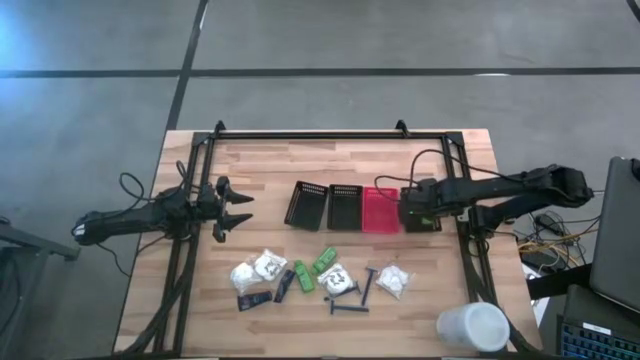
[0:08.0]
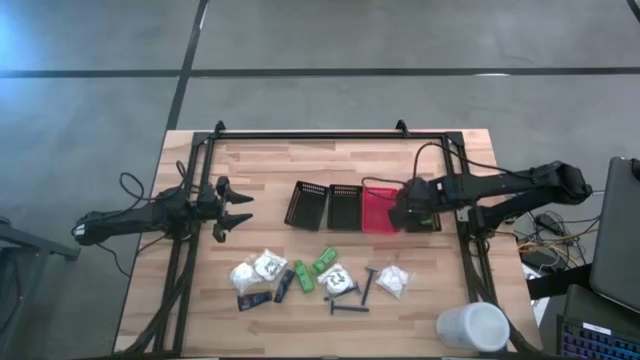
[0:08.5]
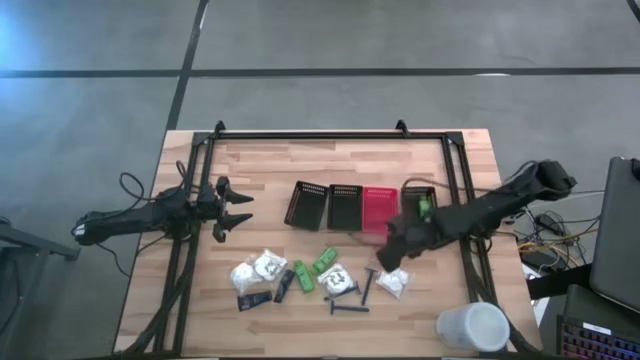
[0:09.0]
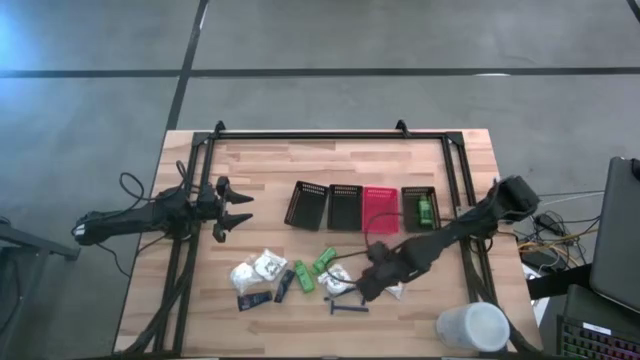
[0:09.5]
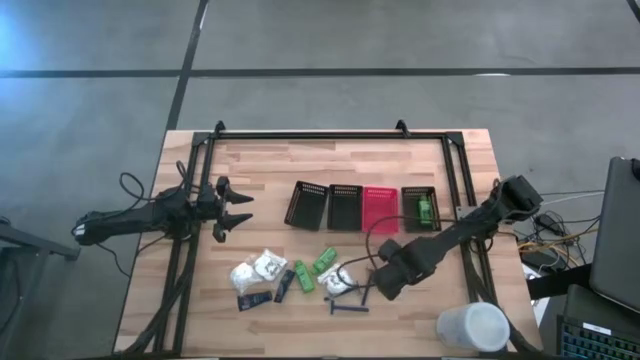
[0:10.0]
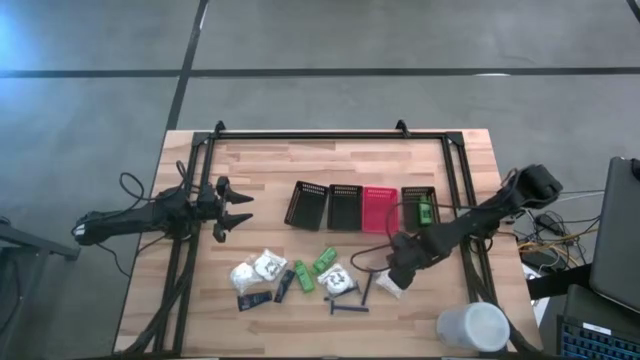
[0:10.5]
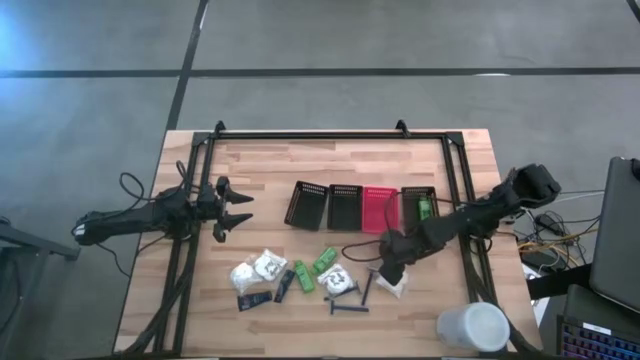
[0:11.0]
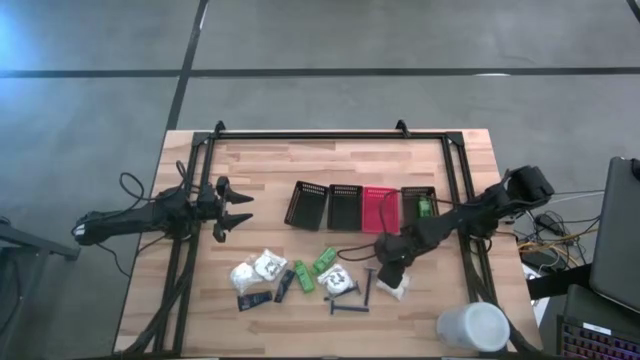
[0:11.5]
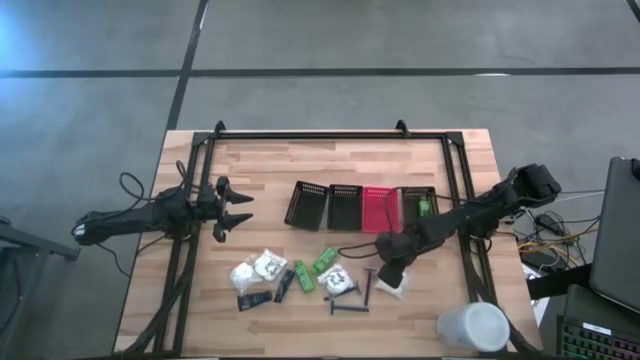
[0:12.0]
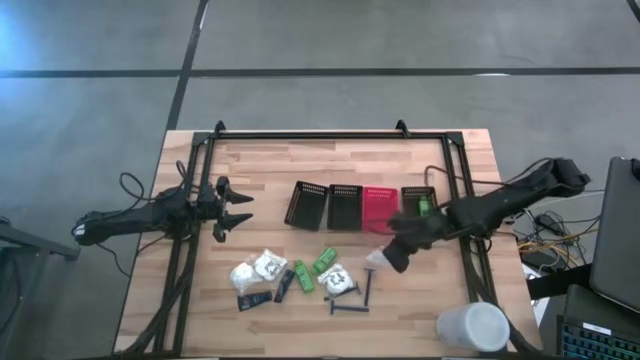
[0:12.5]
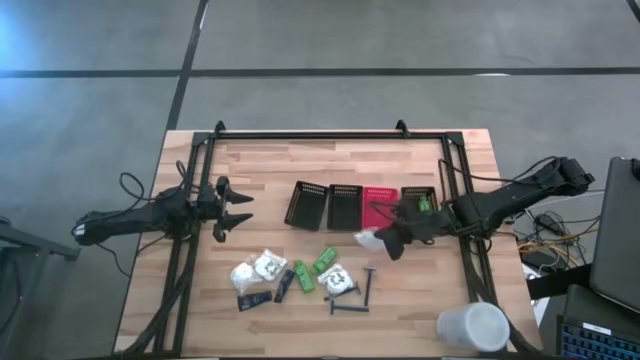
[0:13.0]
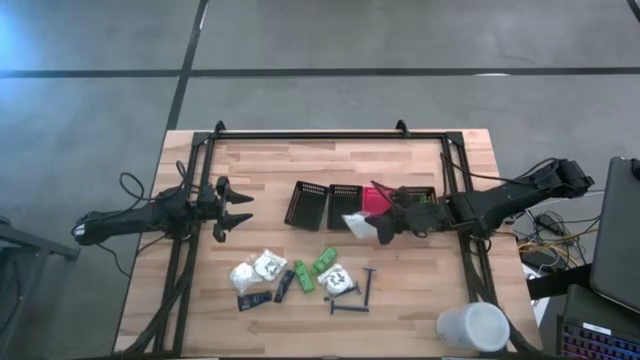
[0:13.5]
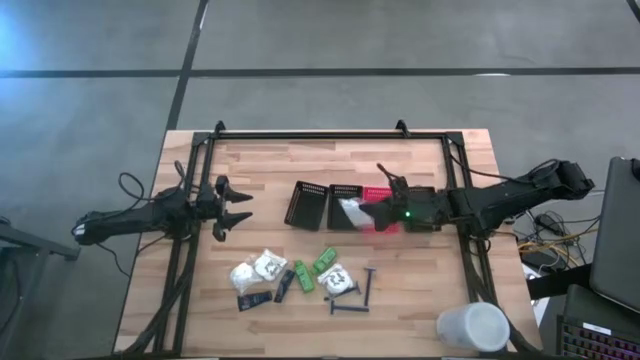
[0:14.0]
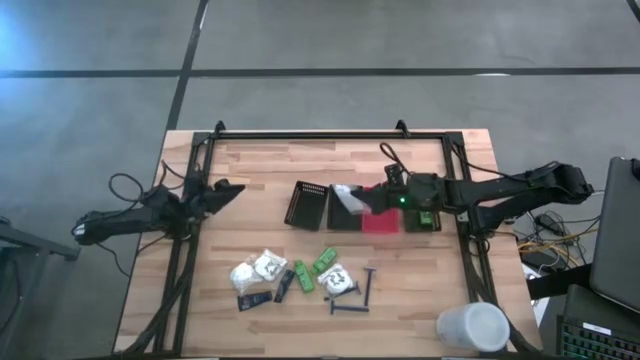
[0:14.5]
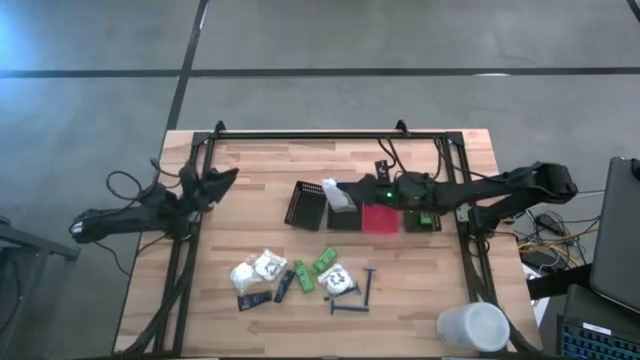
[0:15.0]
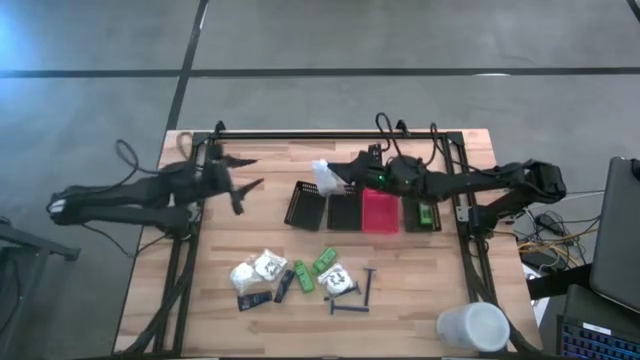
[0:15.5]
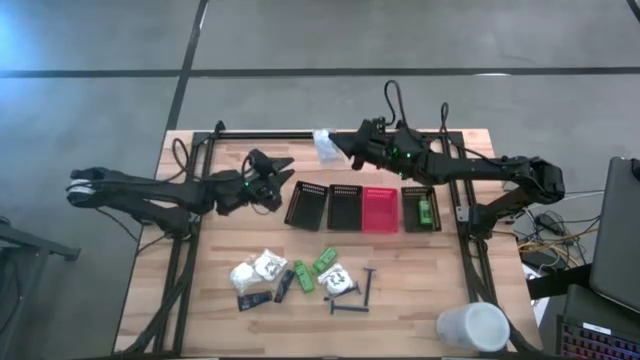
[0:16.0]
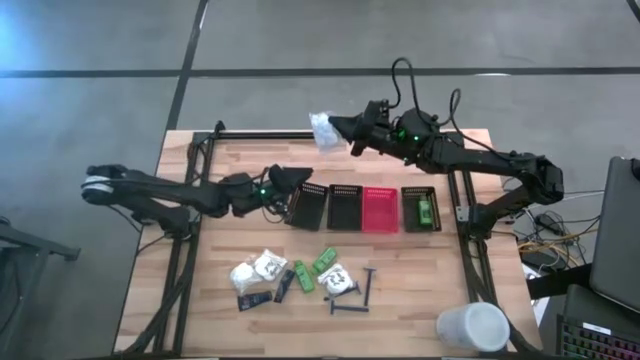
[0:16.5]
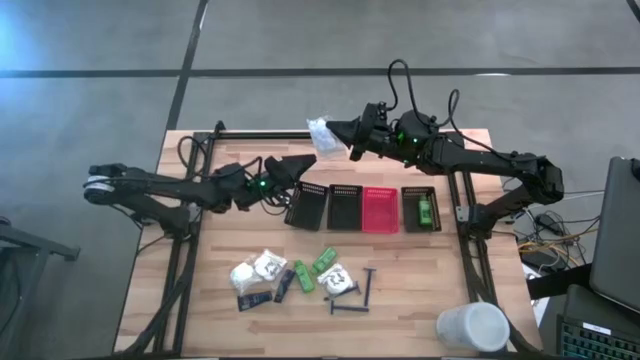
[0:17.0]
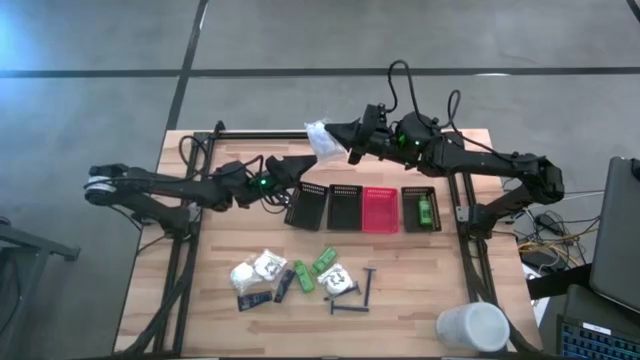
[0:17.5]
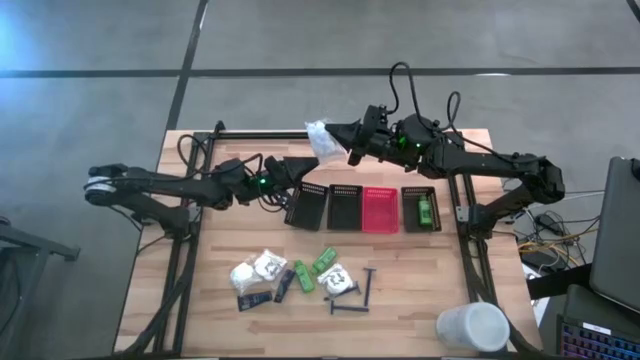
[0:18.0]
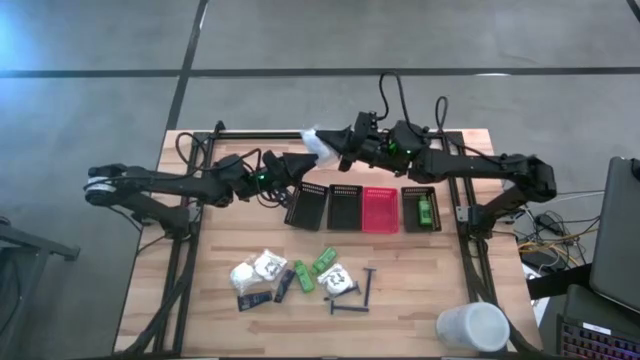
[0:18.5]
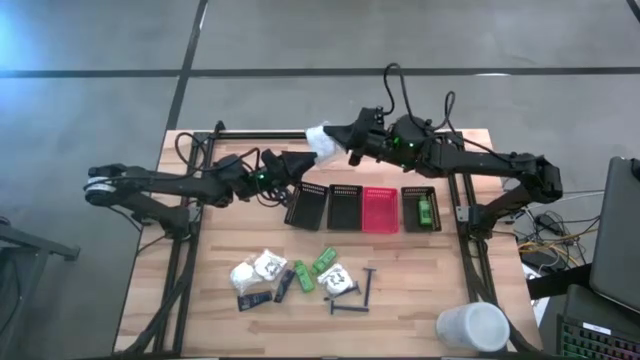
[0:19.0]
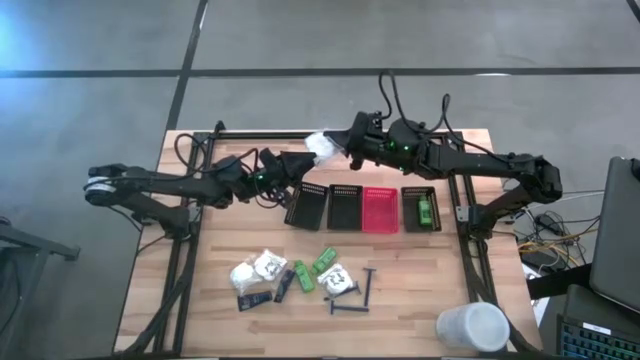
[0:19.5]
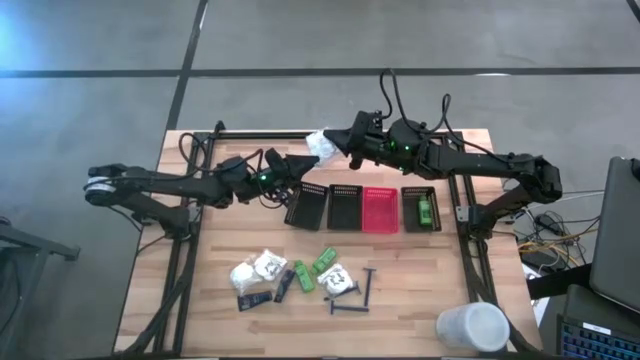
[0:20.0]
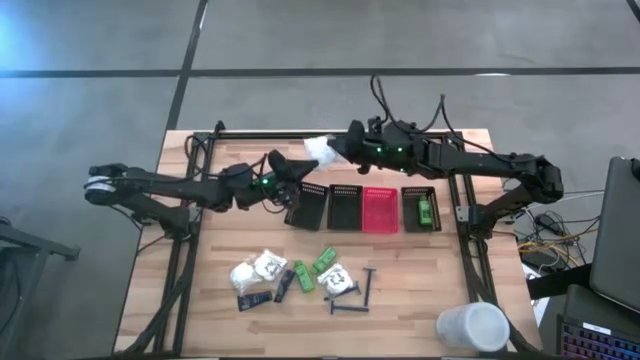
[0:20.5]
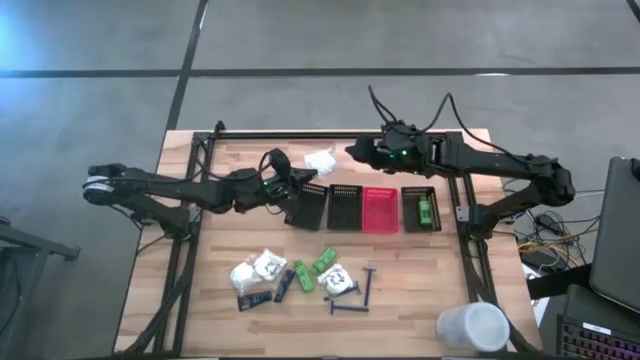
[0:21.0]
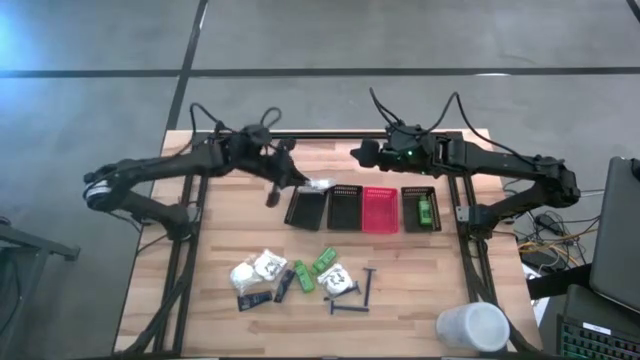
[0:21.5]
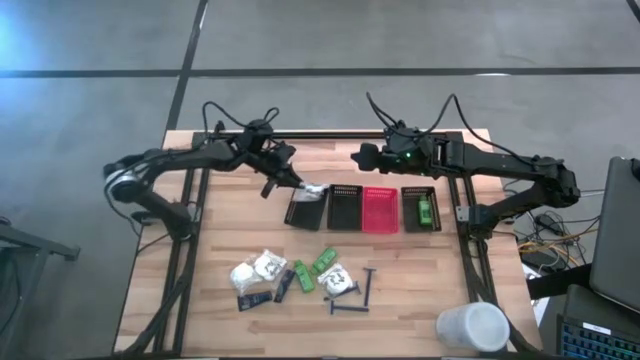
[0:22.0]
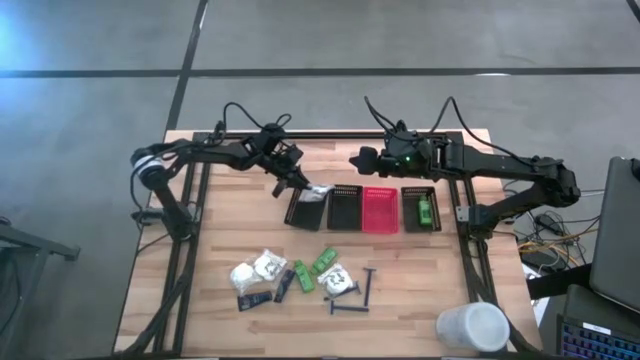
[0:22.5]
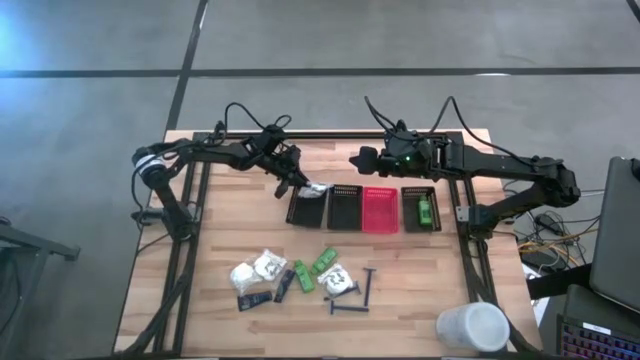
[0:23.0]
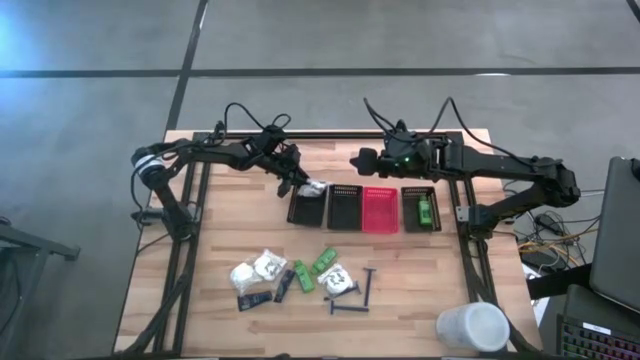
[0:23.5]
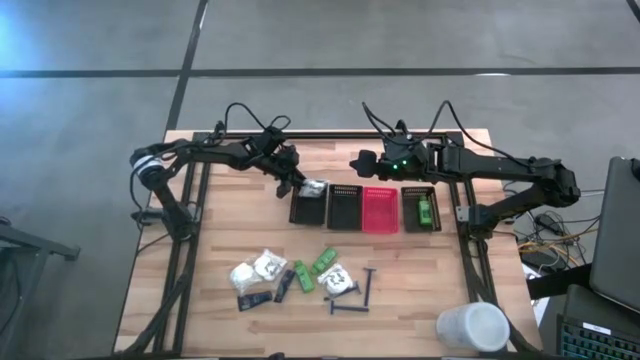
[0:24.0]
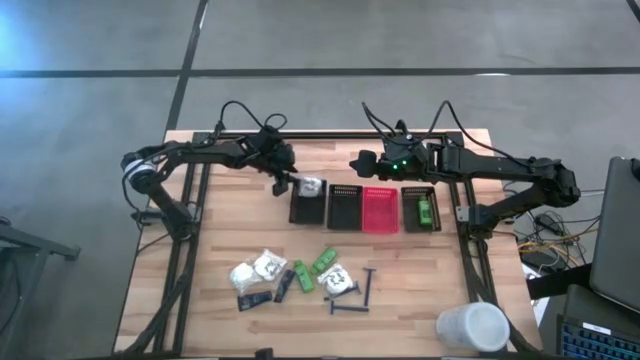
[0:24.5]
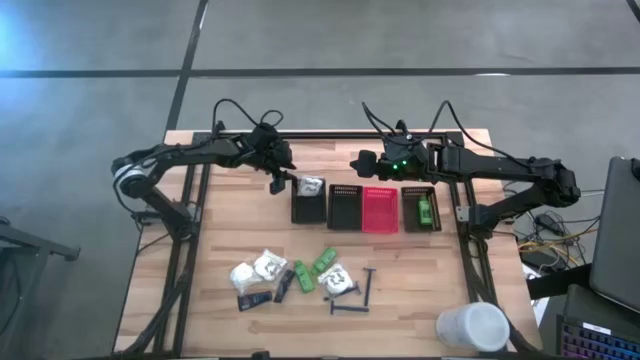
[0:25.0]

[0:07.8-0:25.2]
Task: Pick & Place Travel size toiletries
Put the white cotton pack into the left black bin

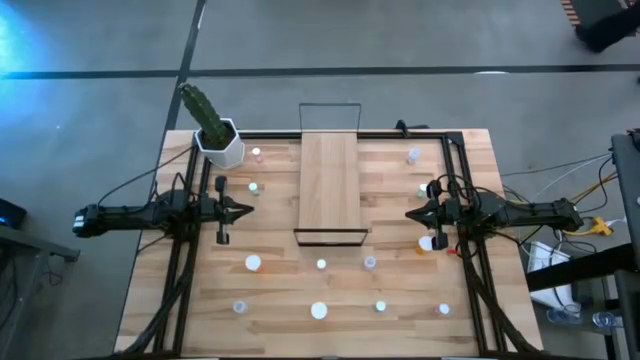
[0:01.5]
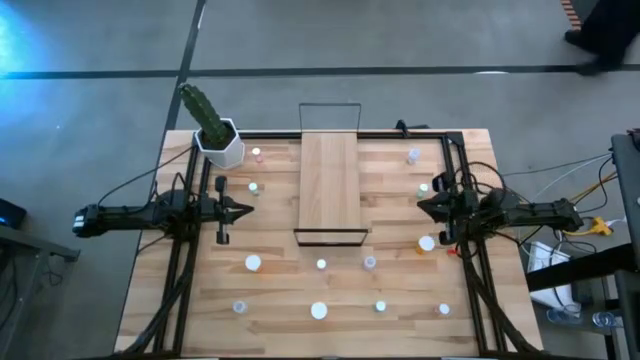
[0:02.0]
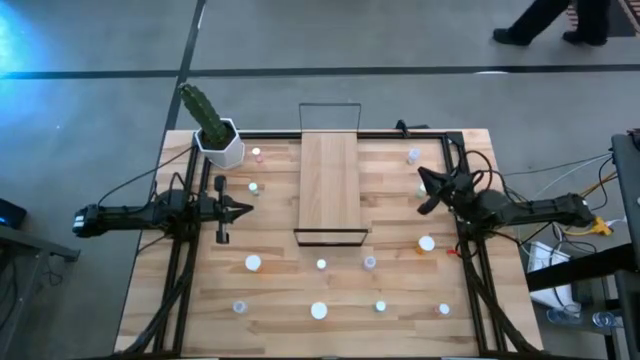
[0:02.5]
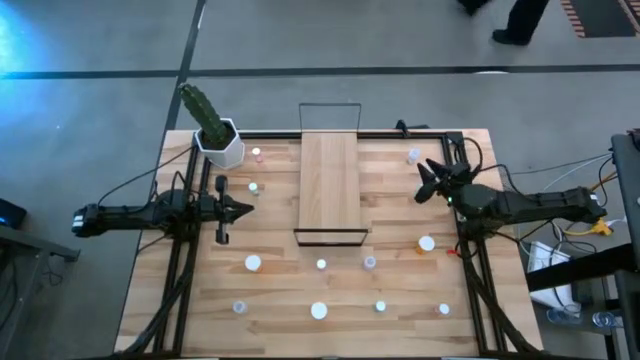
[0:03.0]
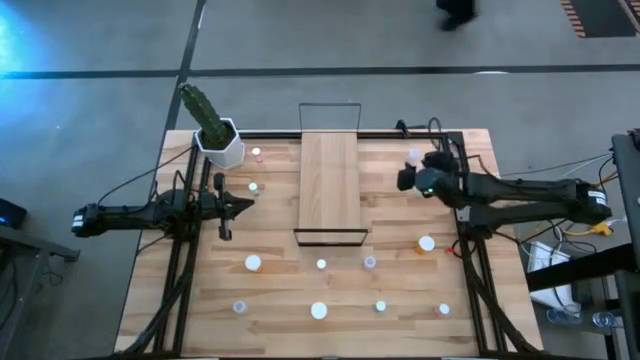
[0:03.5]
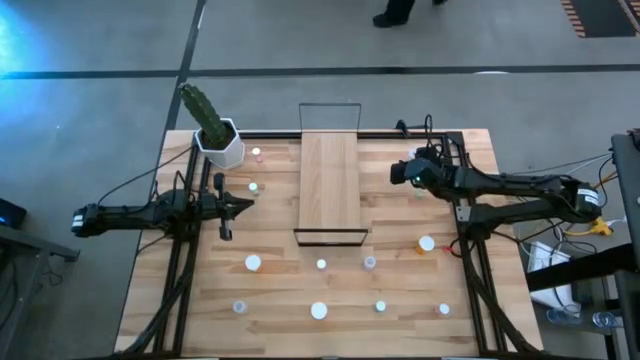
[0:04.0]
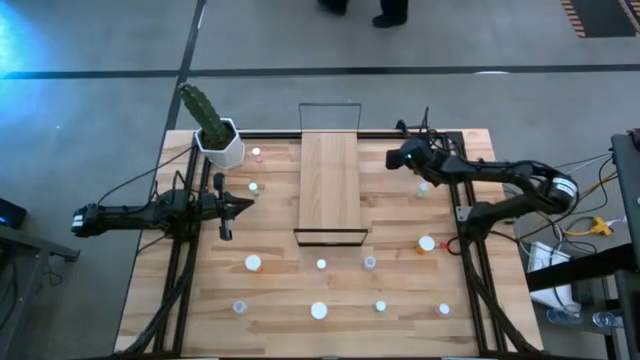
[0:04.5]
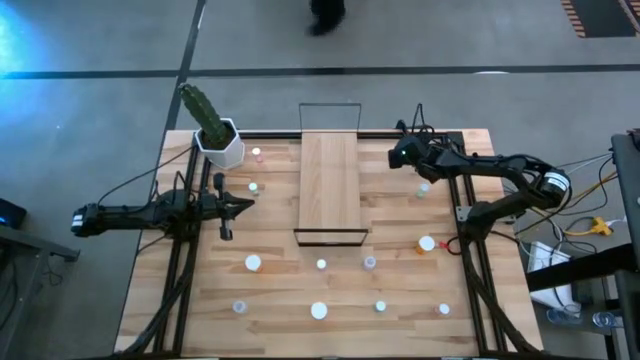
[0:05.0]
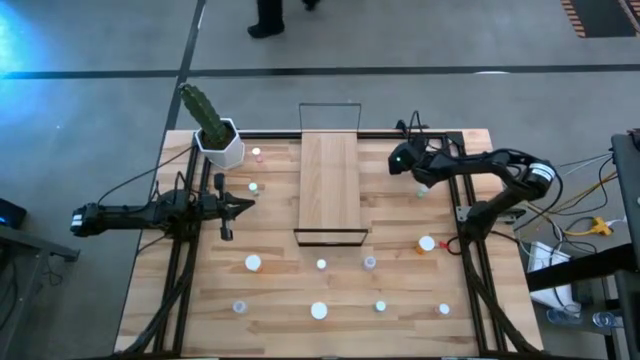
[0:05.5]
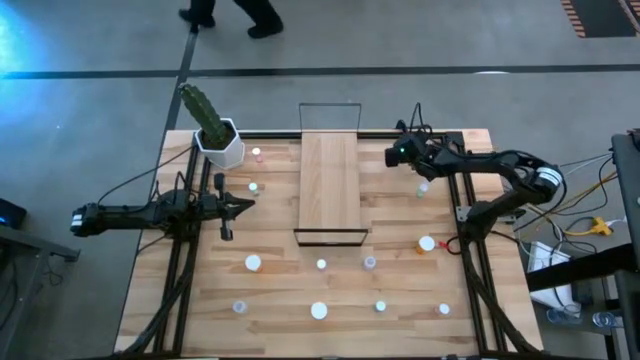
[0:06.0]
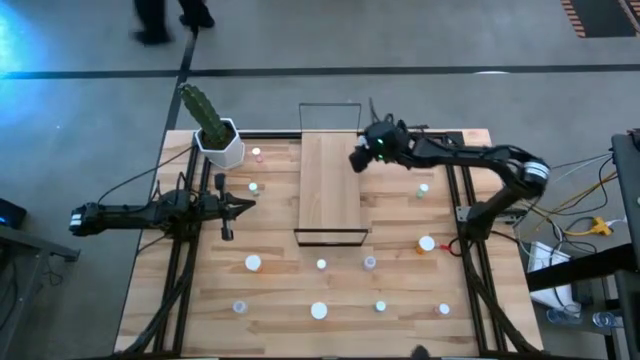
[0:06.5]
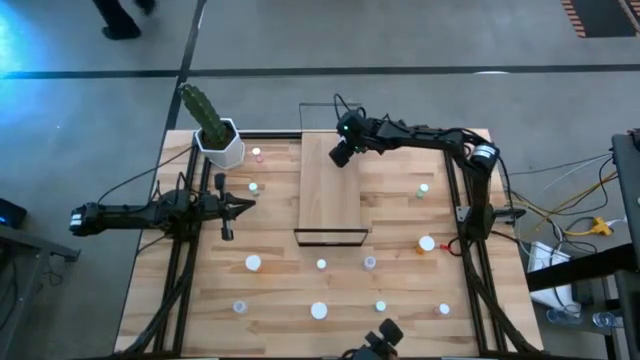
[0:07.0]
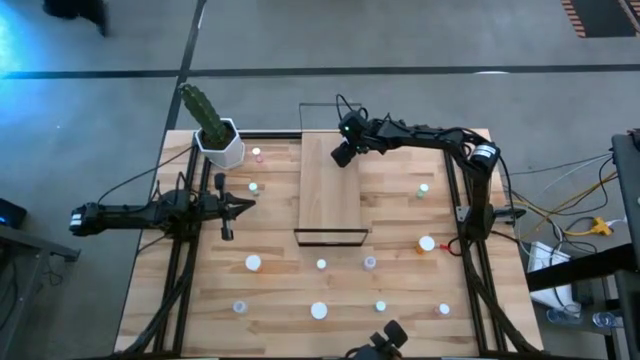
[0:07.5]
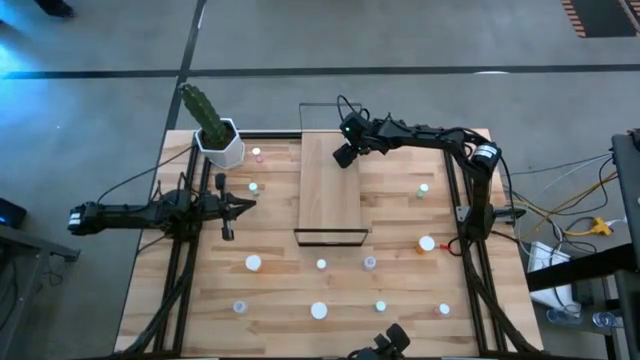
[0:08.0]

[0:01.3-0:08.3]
Task: Pick and place medicine bottles onto shelf by color
Put the transparent white pill bottle on the shelf
